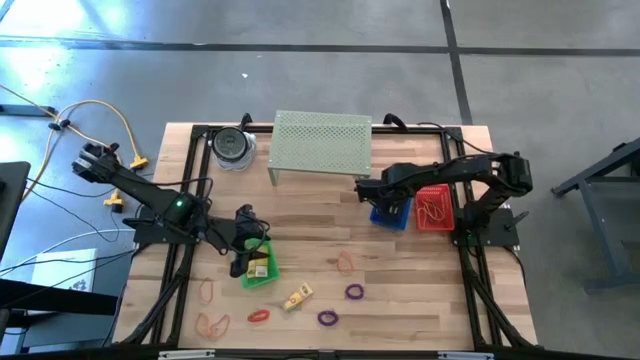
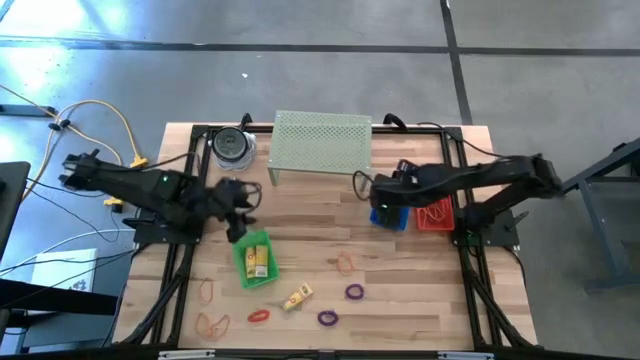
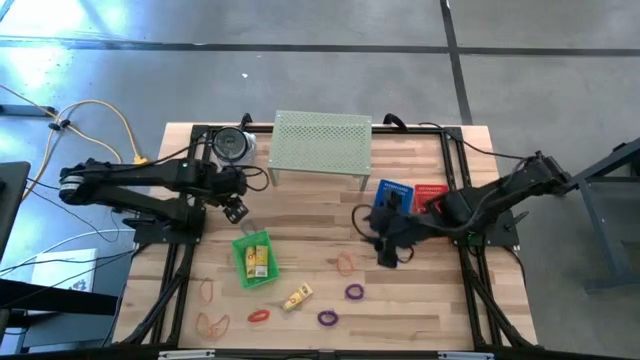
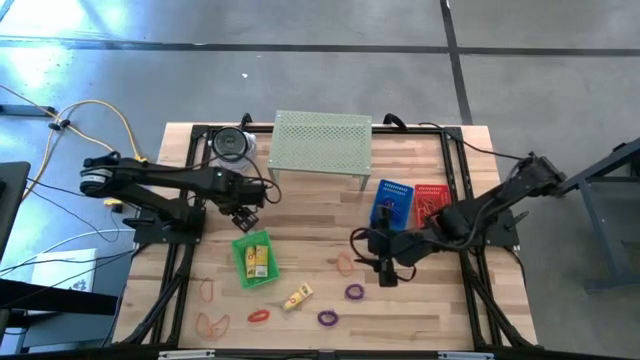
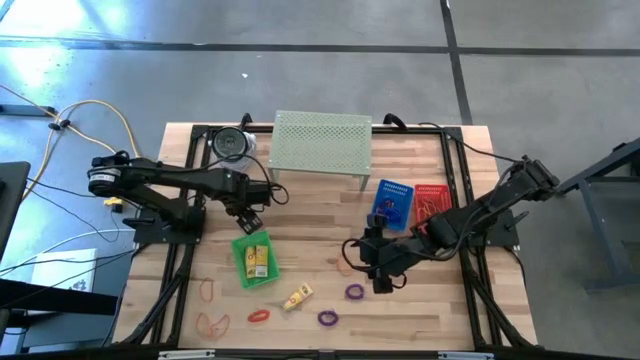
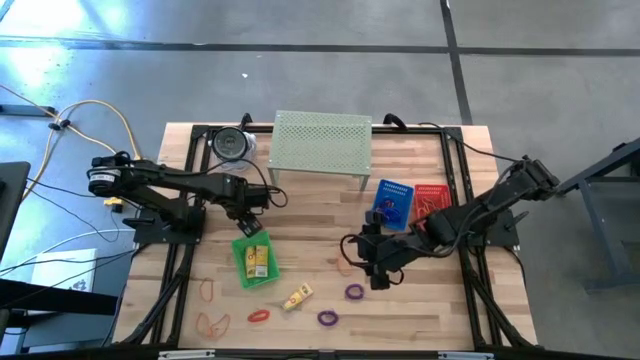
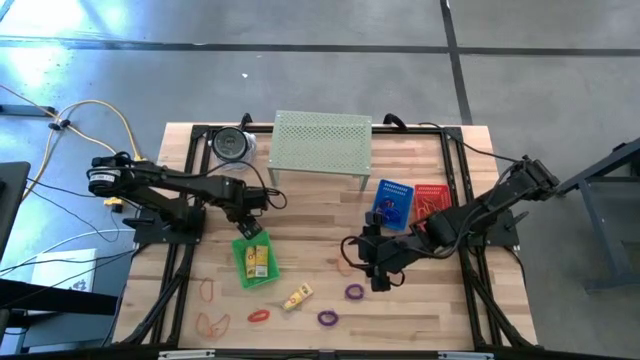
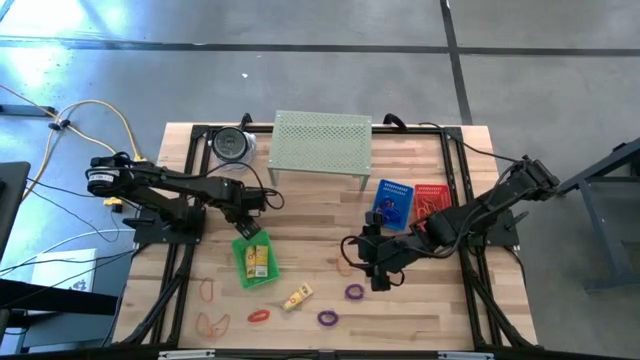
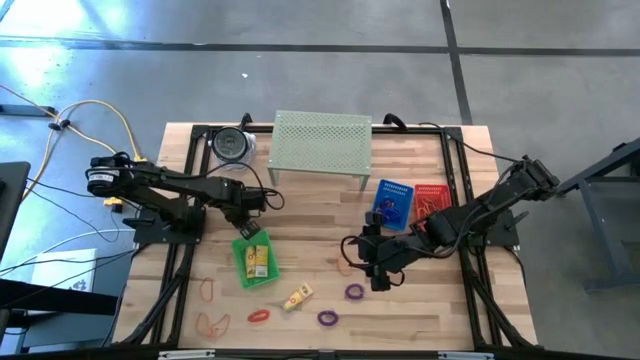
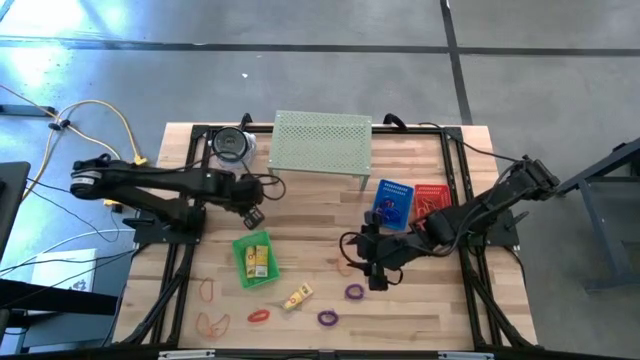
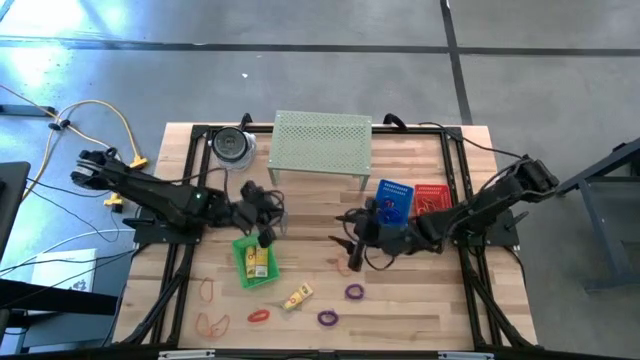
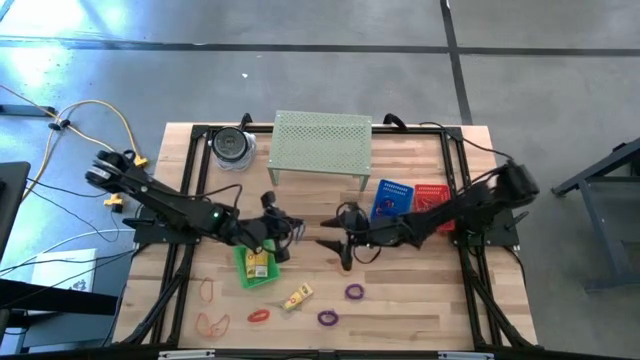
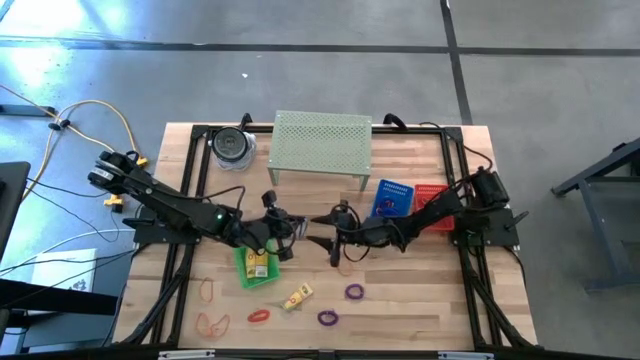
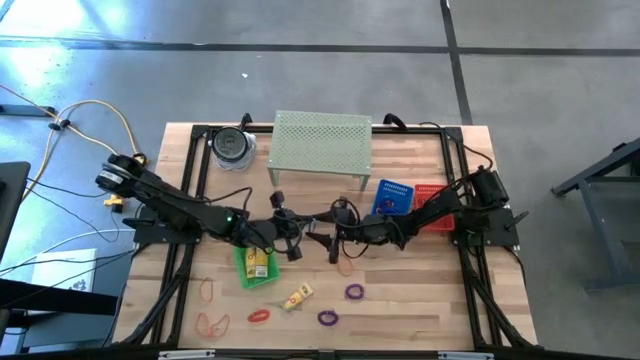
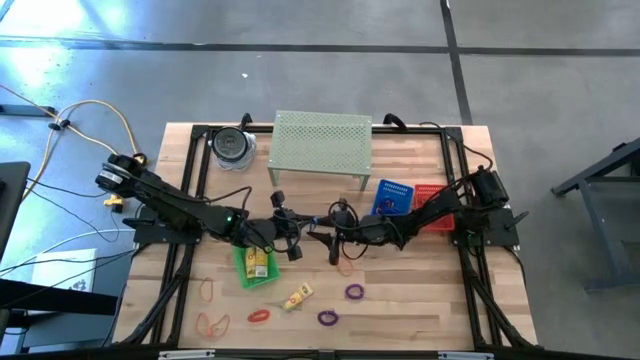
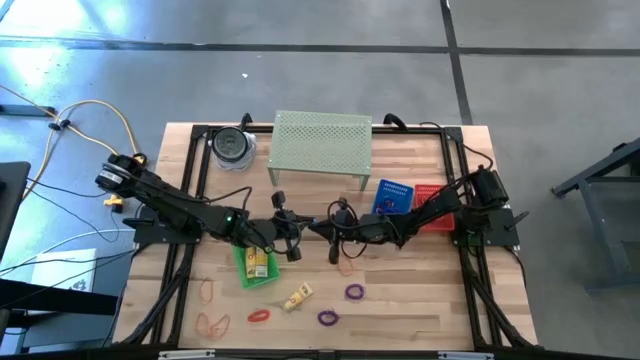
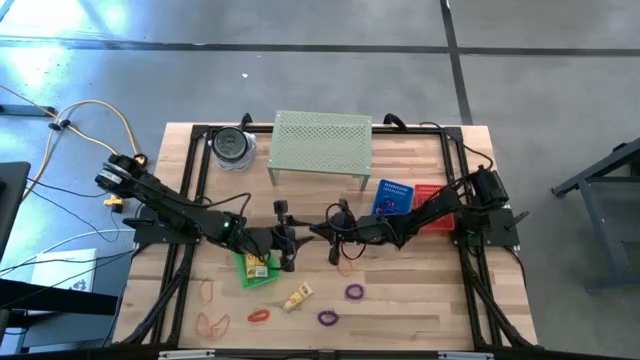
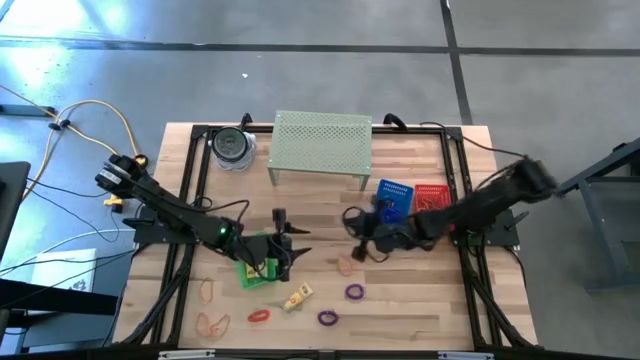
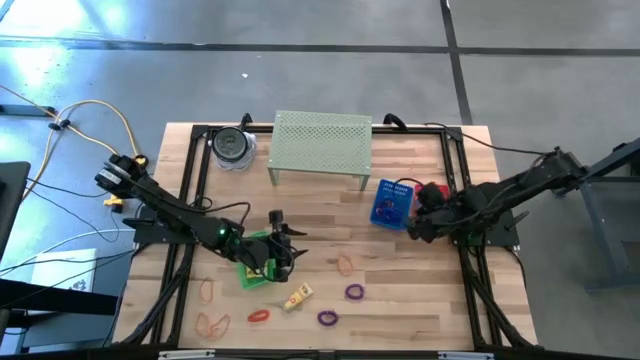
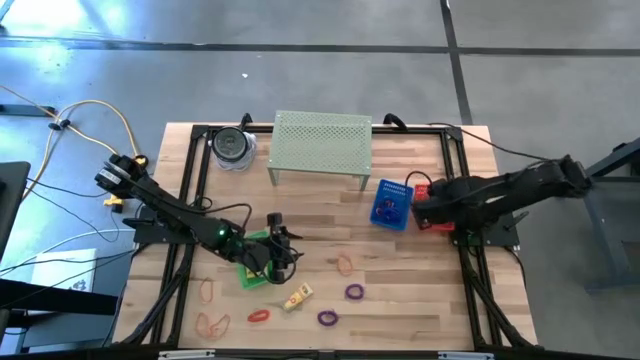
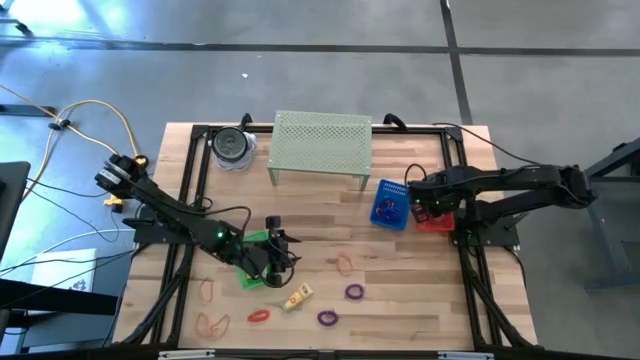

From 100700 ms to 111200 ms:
Task: Pick & Place Office Desk Supplies
Put the blue rubber band into the red bin

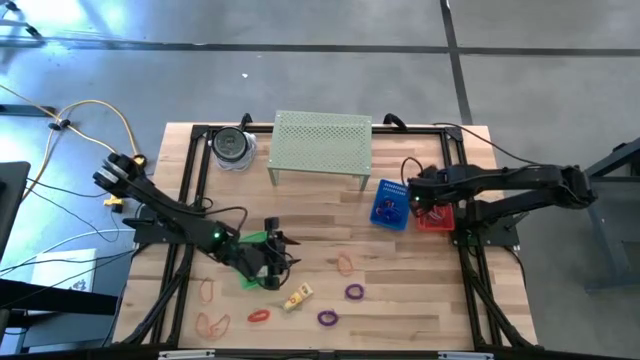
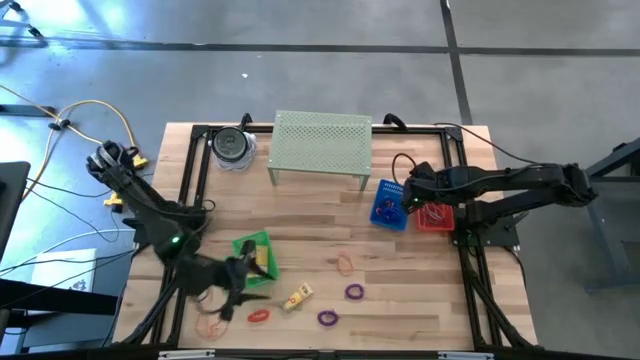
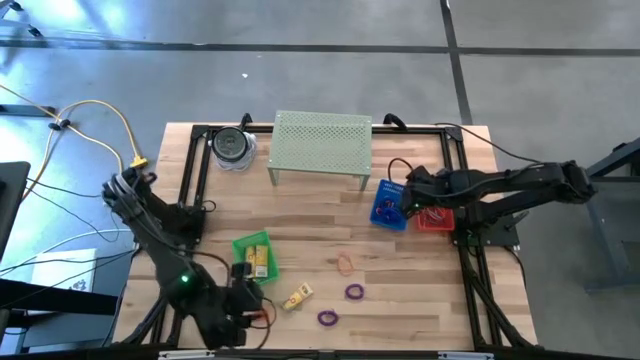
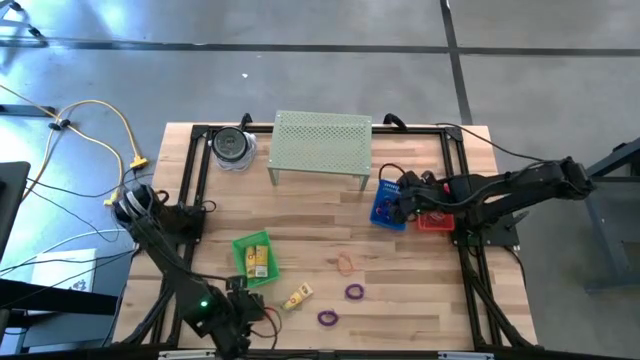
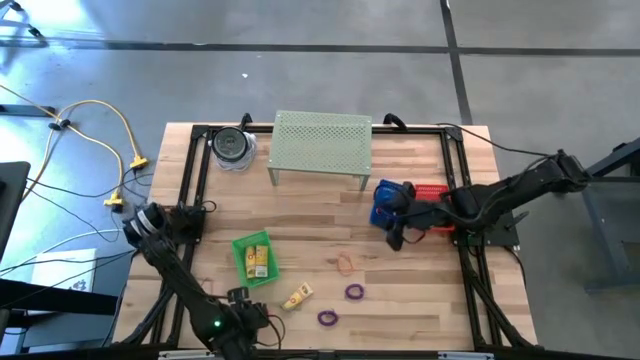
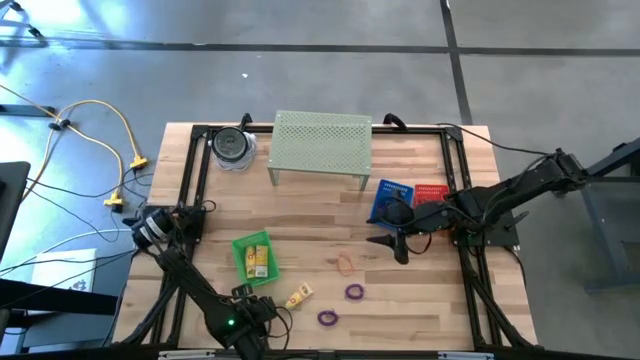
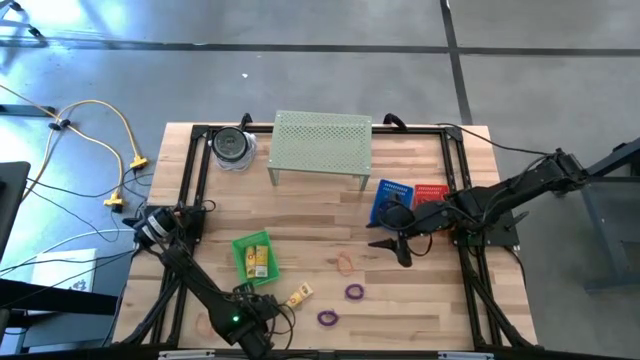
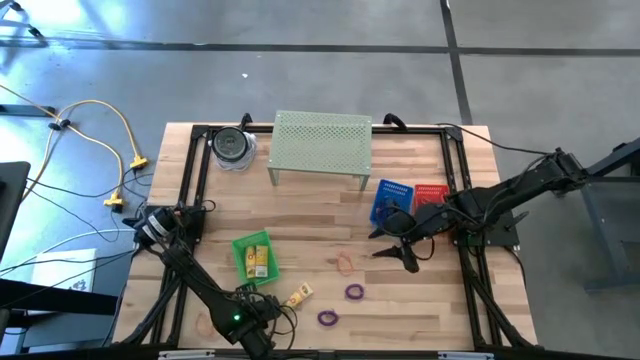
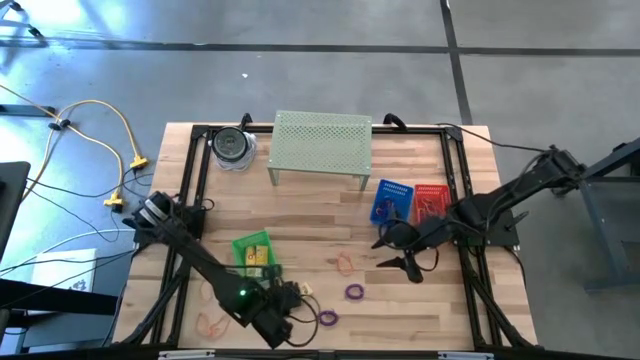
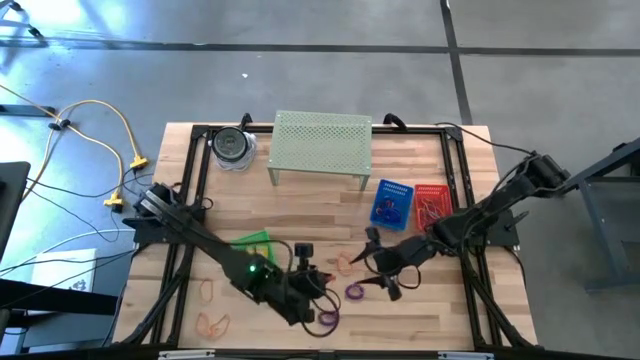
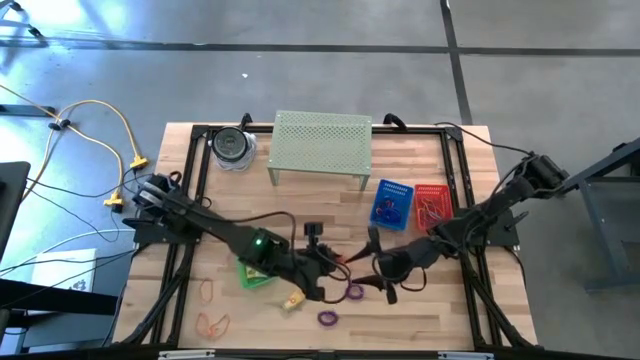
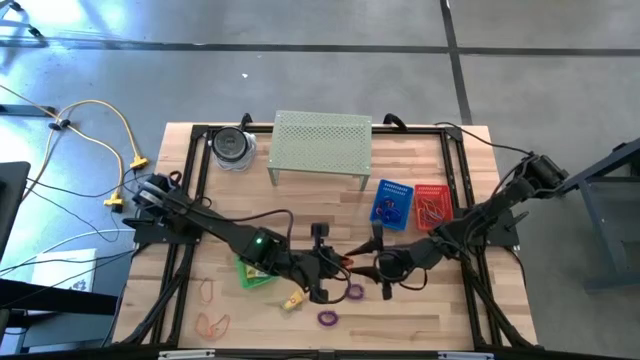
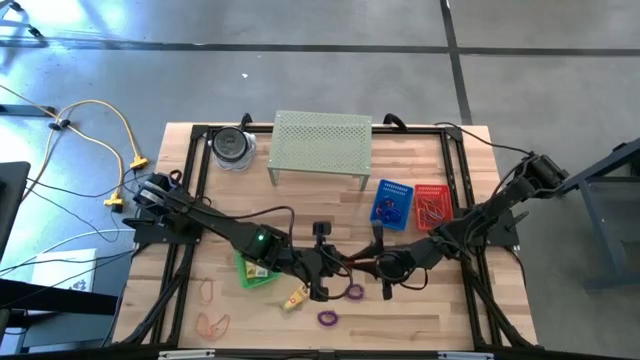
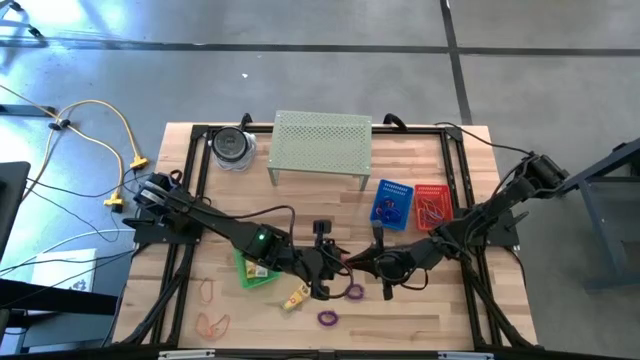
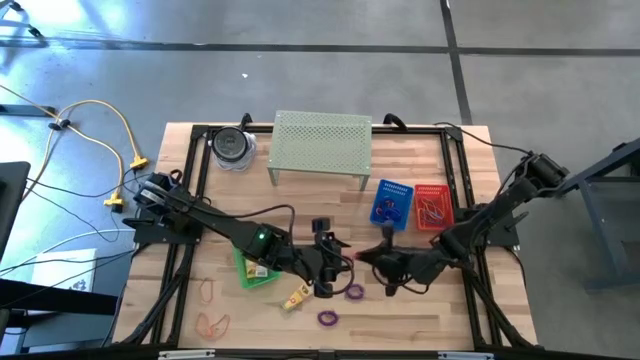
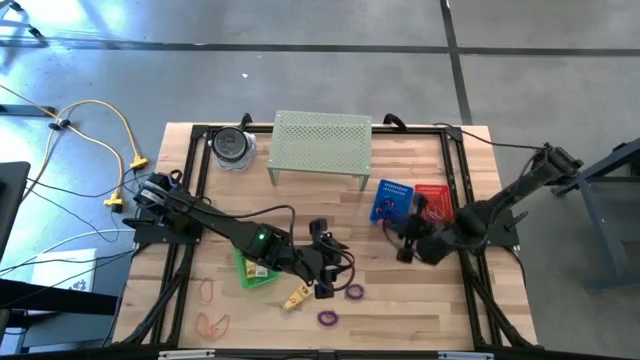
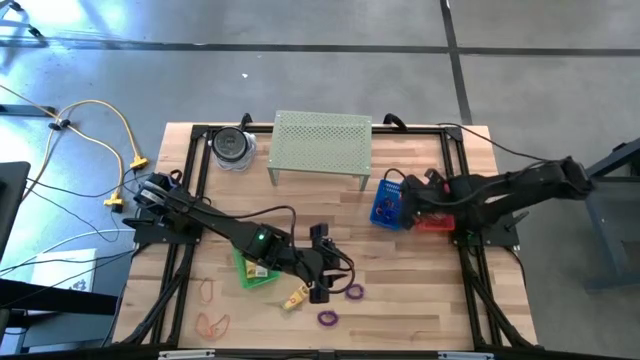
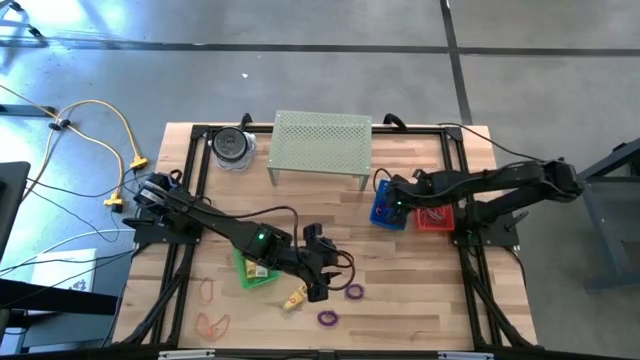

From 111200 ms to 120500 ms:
Put the orange spring keychain into the blue bin

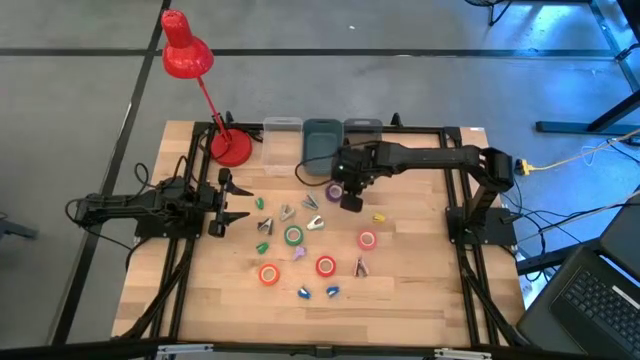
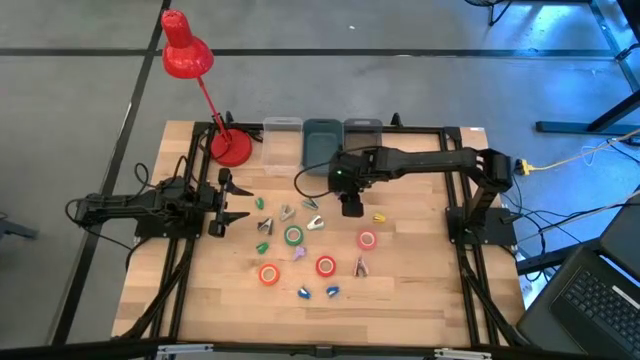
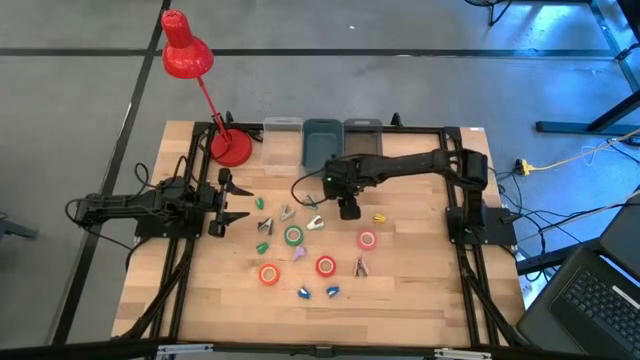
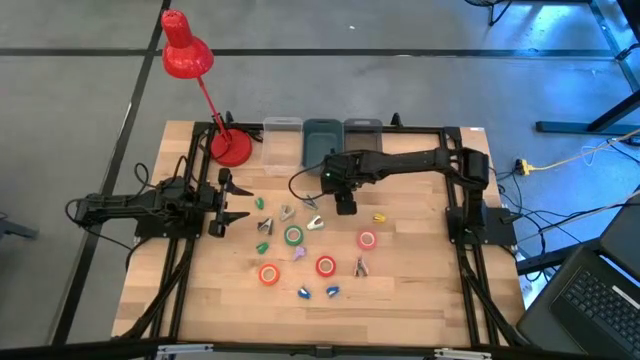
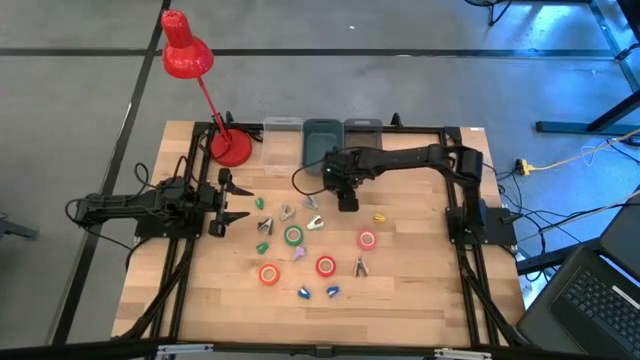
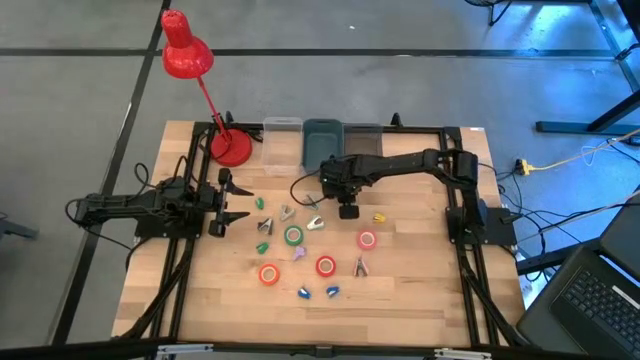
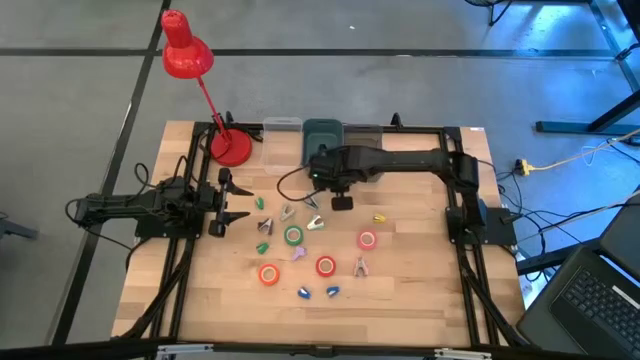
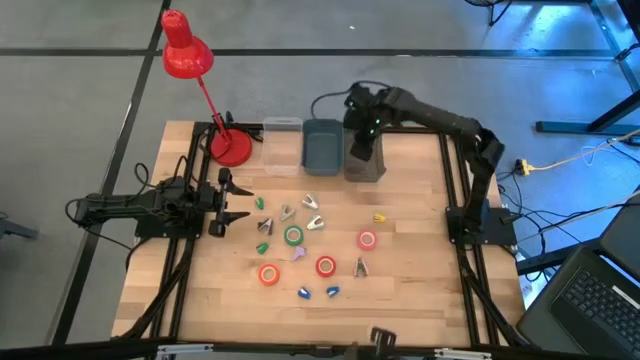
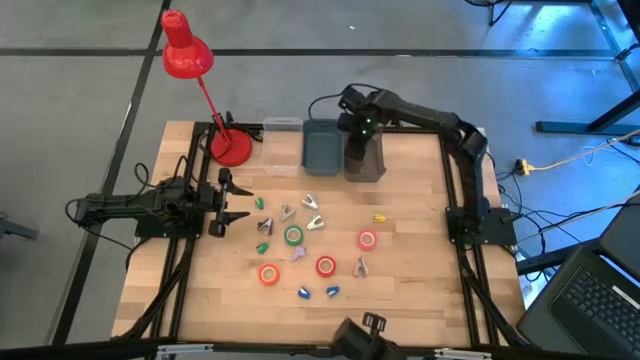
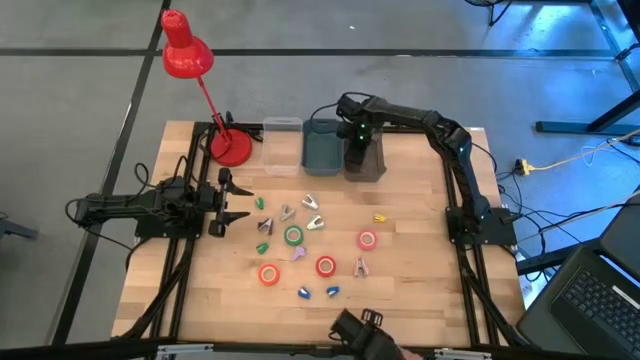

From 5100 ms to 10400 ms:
Task: Pick and place Stapler, Stapler remover, tape
Put the purple tape into the black bin
